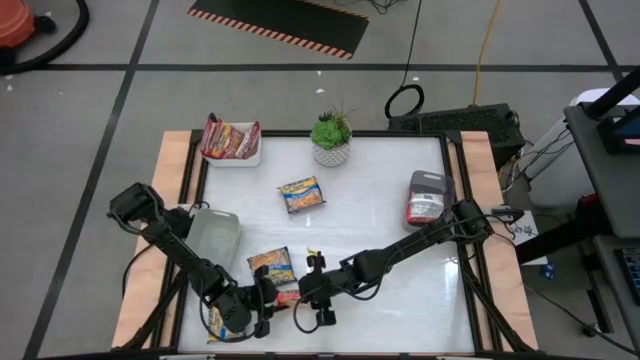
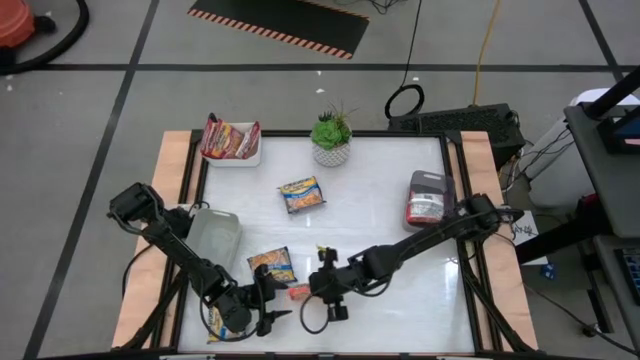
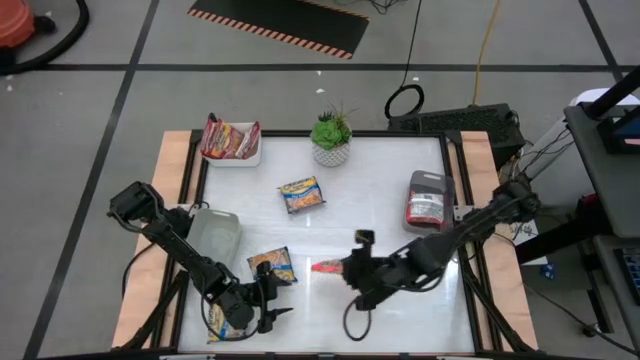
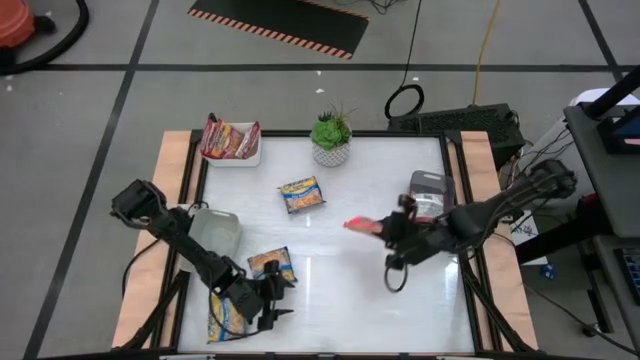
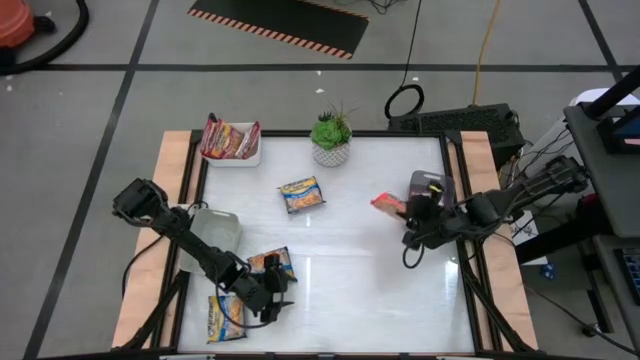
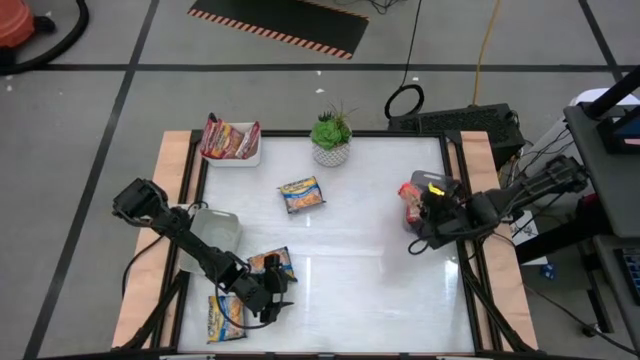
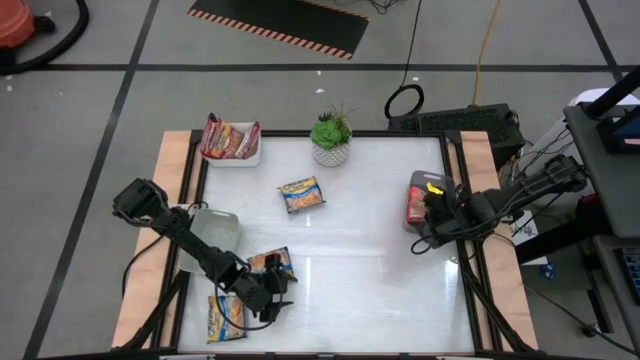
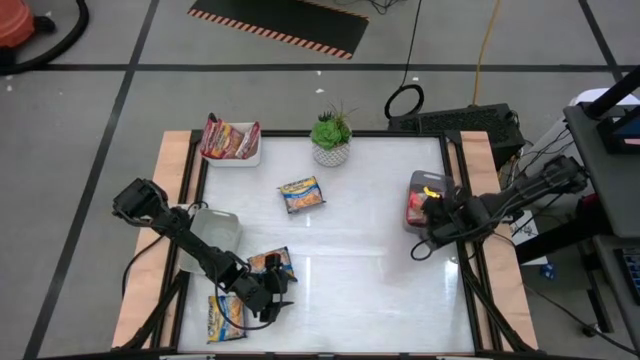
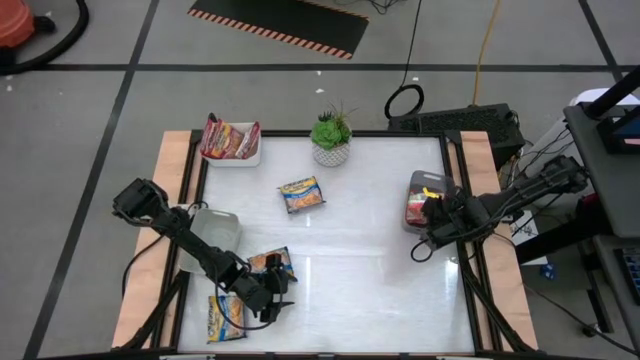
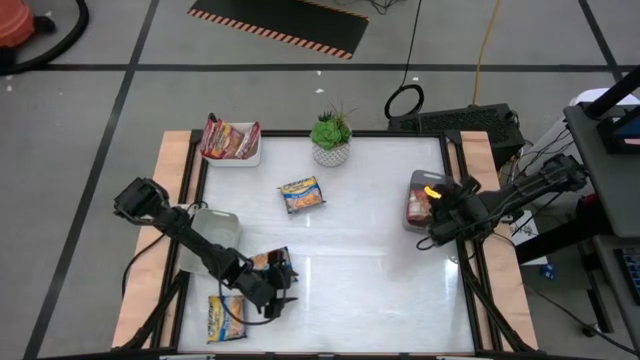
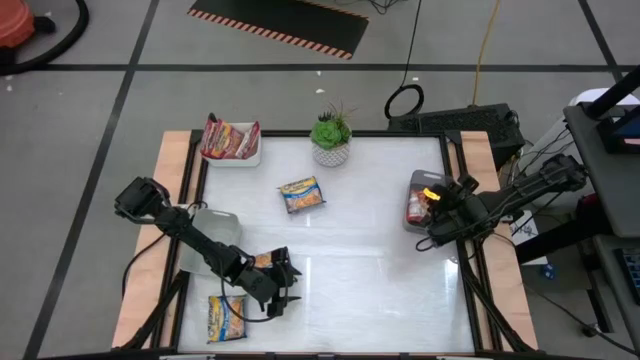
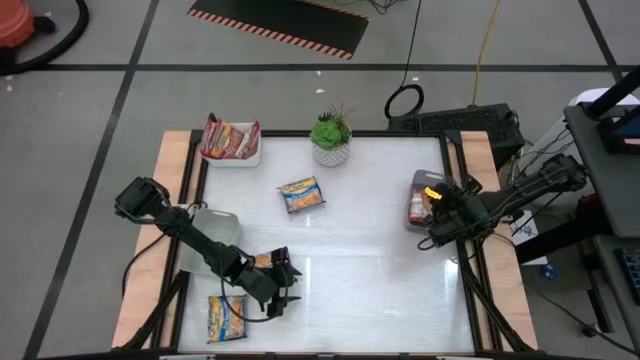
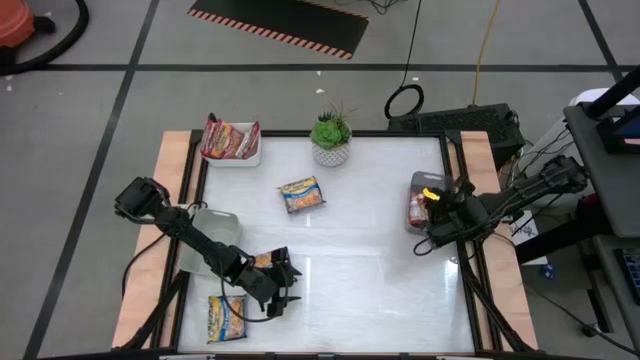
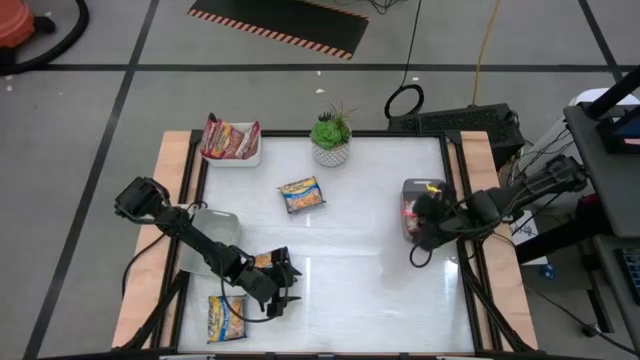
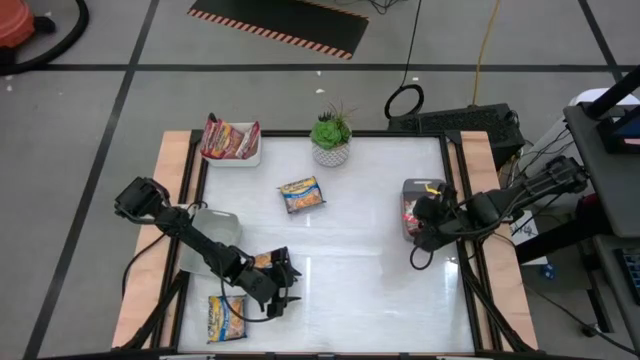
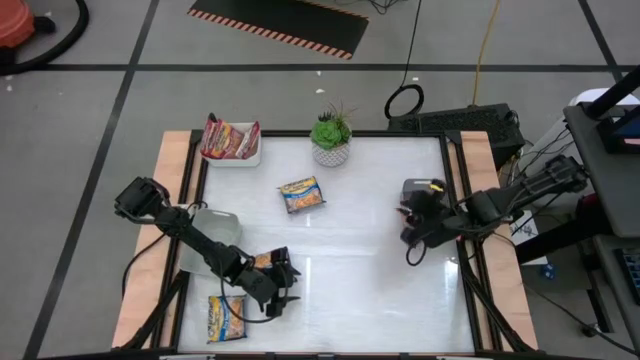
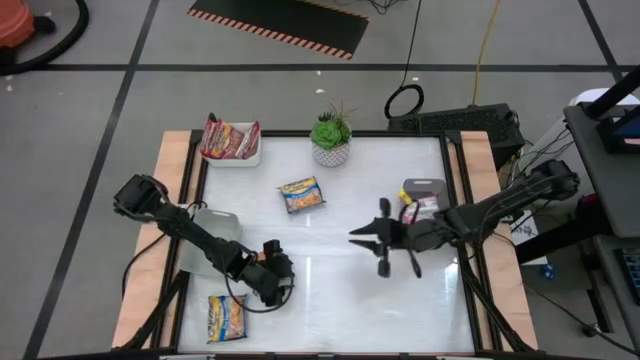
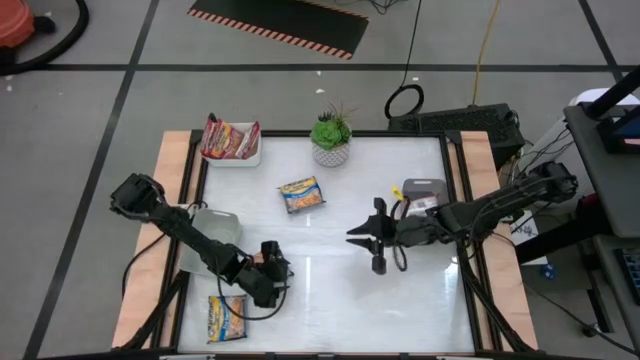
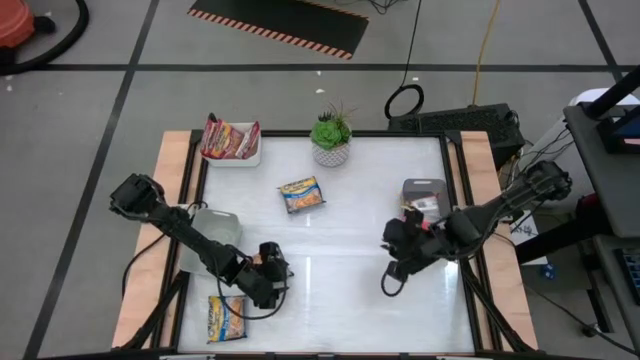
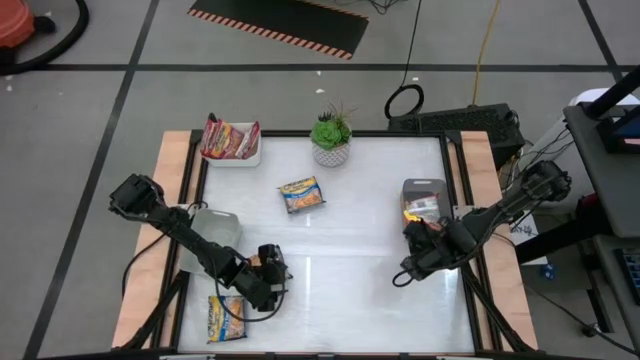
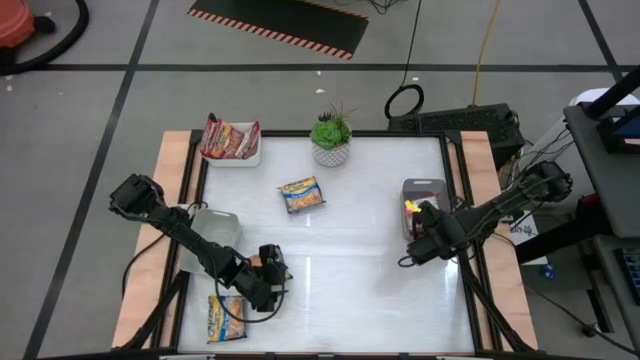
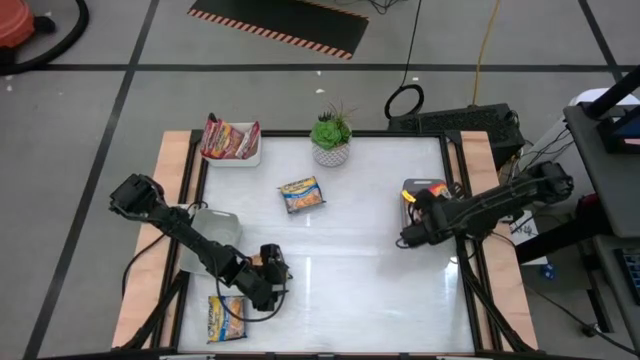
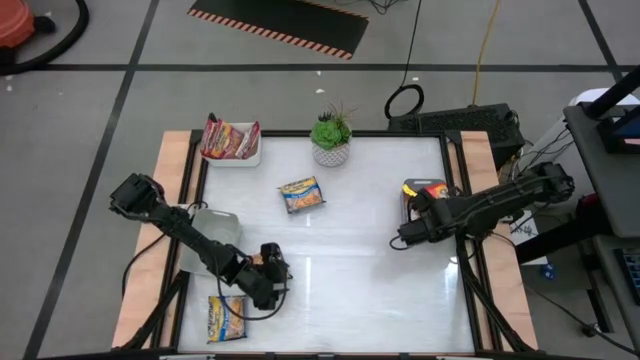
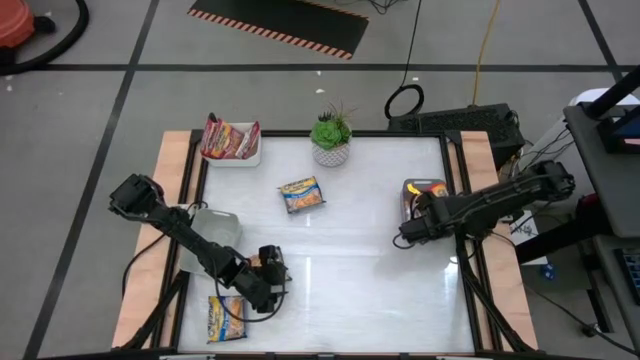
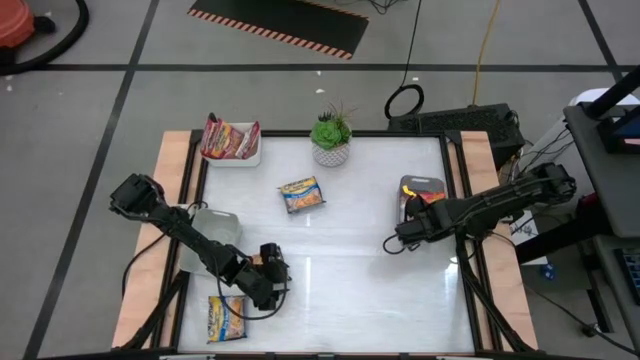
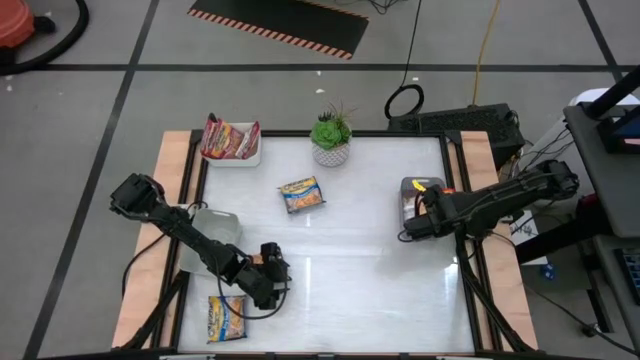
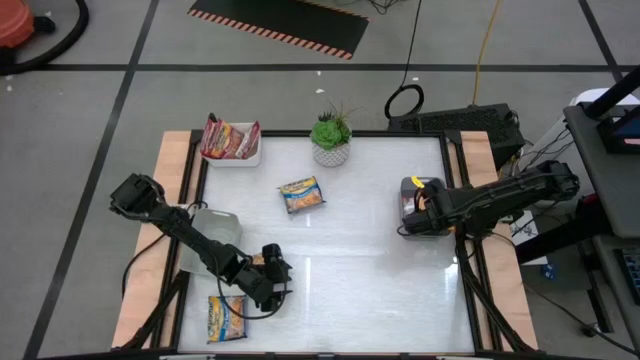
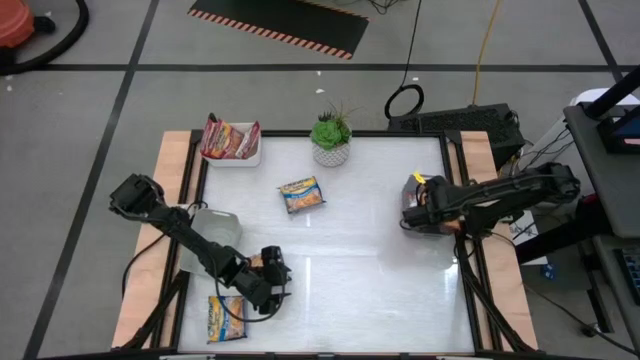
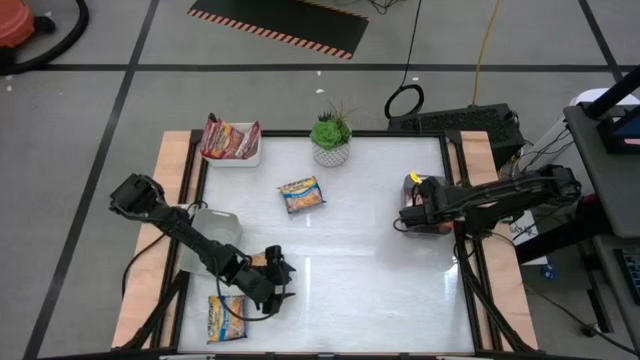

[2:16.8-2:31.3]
Task: Sort Maruchan noodles
Put the orange noodle pack into the black bin

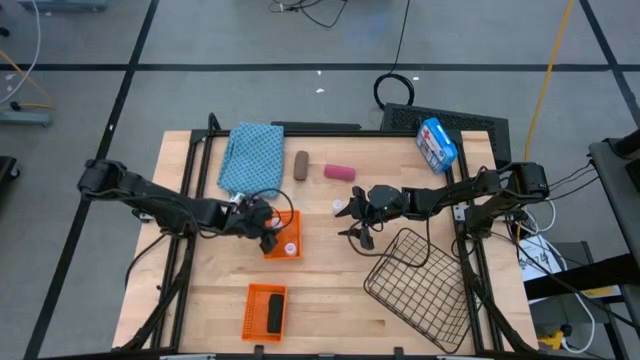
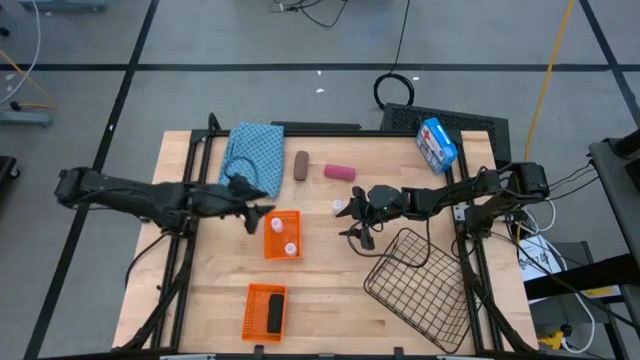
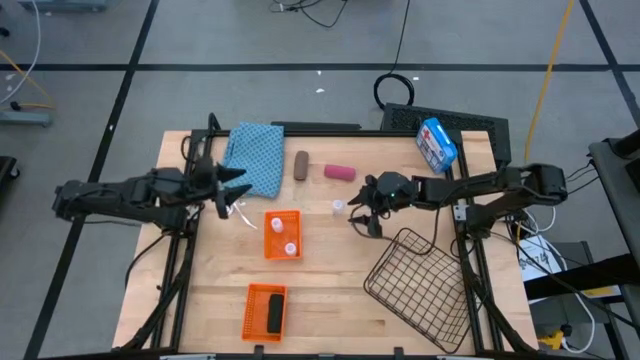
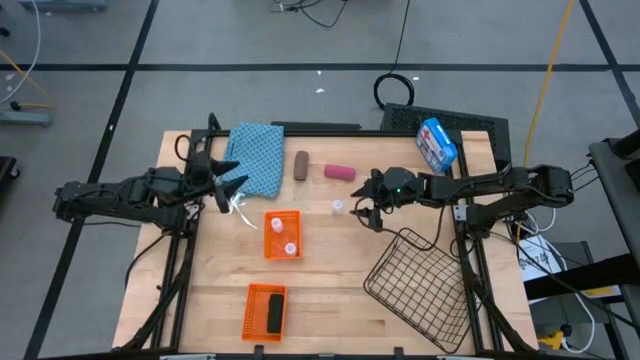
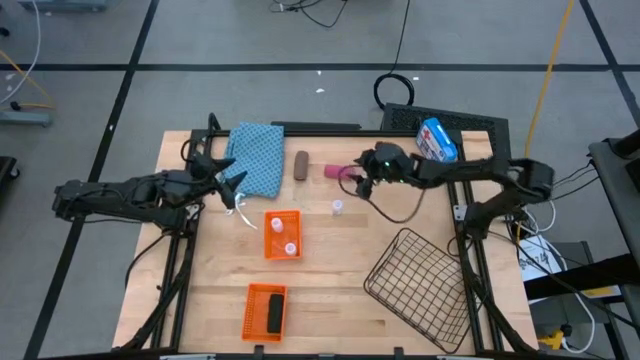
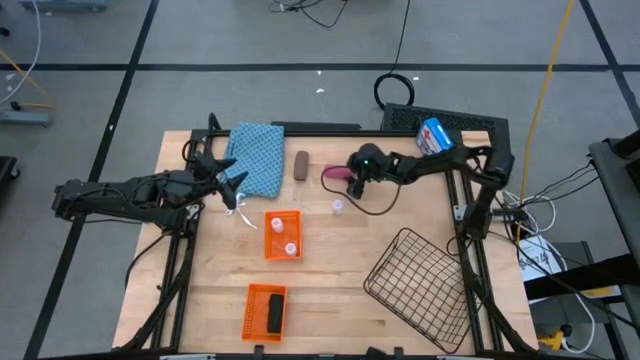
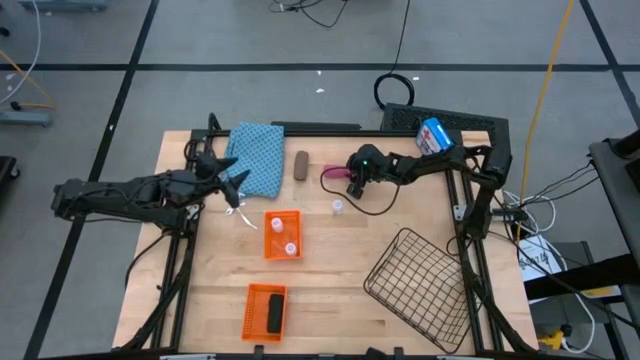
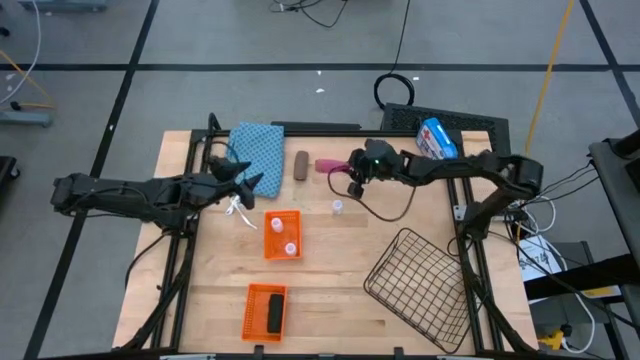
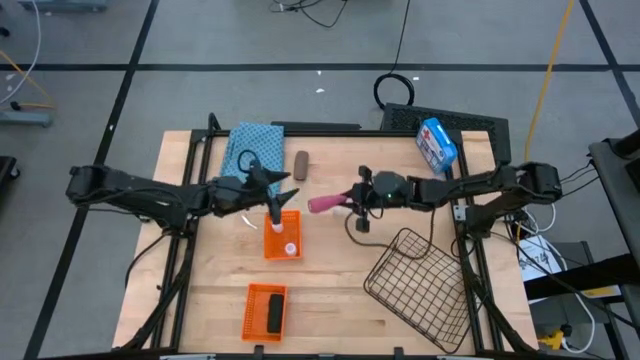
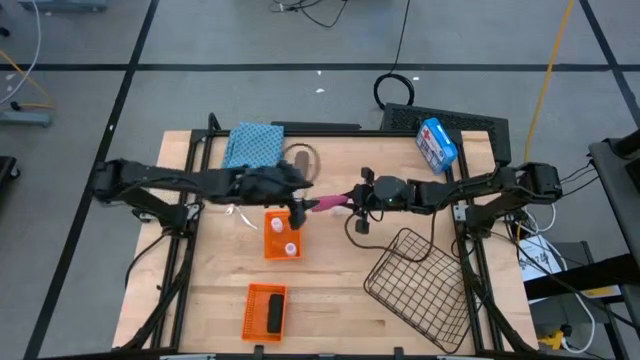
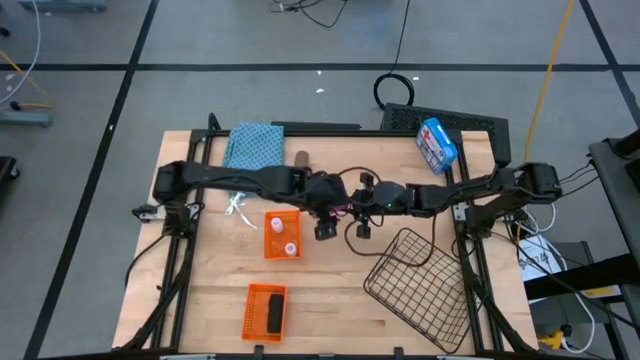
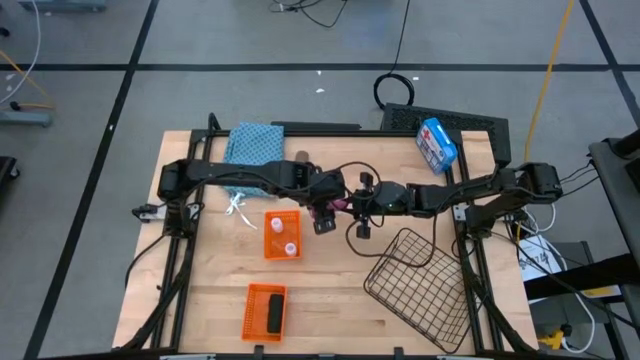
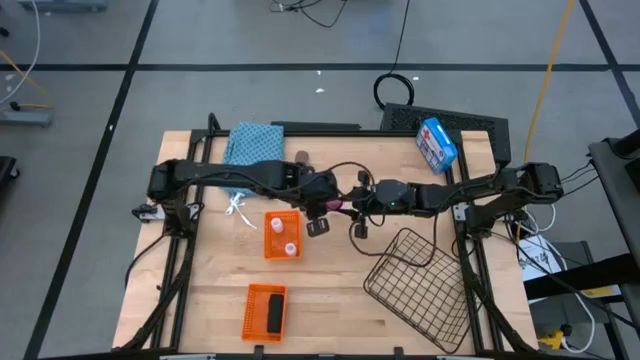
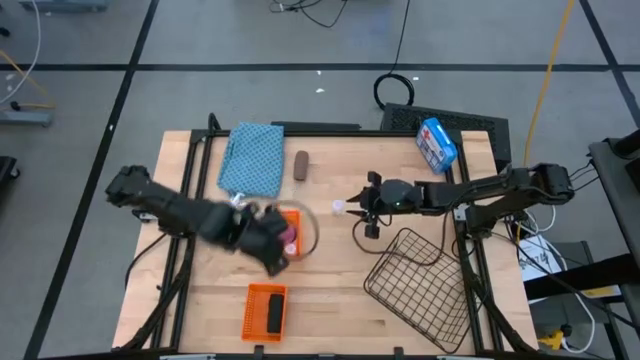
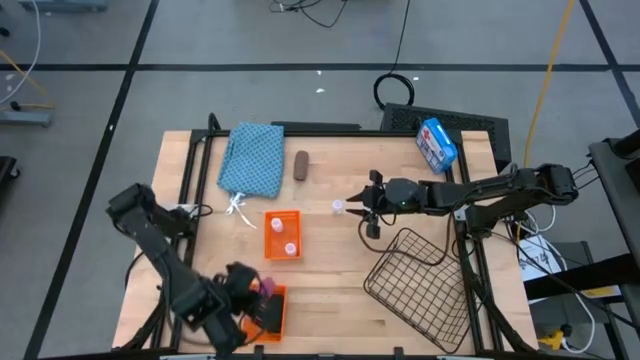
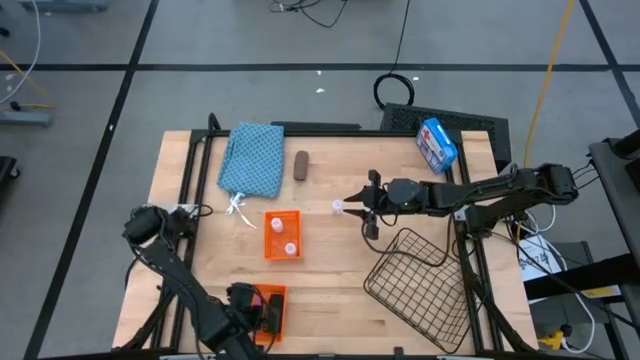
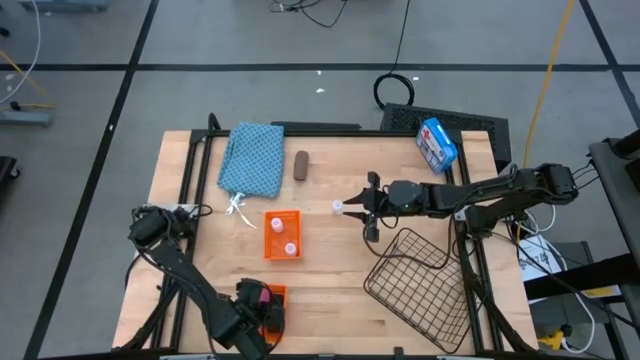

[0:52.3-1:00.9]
Task: Pick & Place Medicine items
Put the pink bandage into the bottom orange basket
